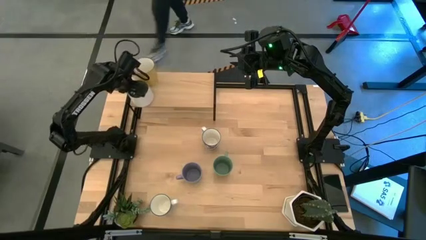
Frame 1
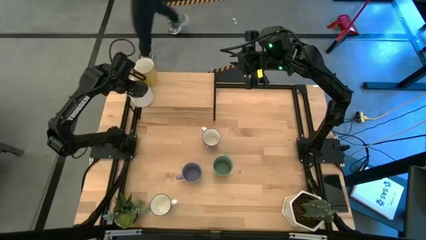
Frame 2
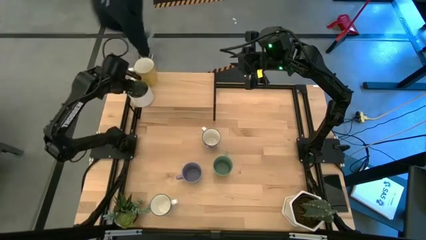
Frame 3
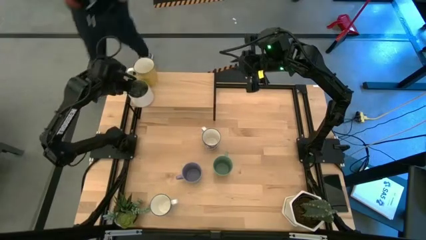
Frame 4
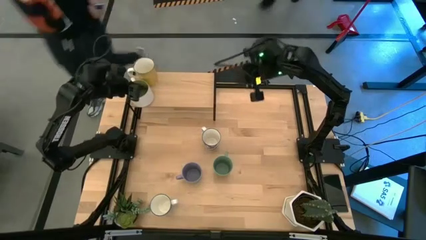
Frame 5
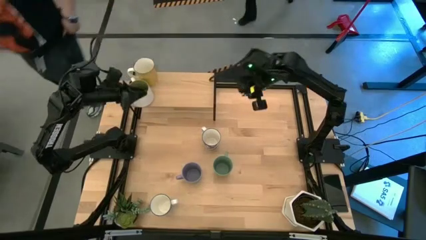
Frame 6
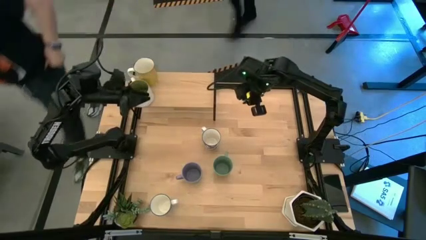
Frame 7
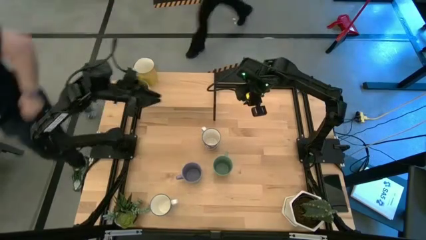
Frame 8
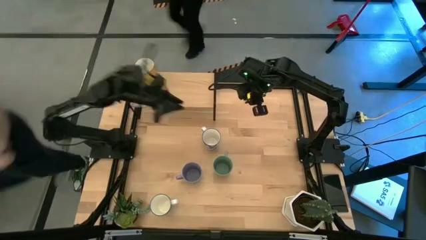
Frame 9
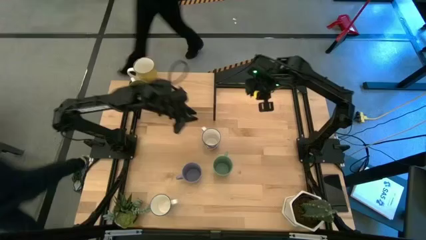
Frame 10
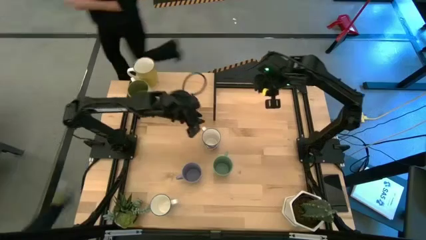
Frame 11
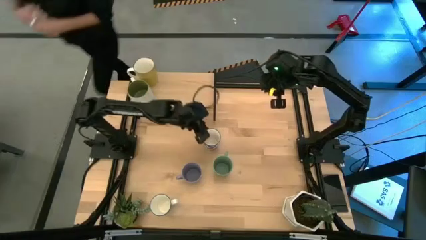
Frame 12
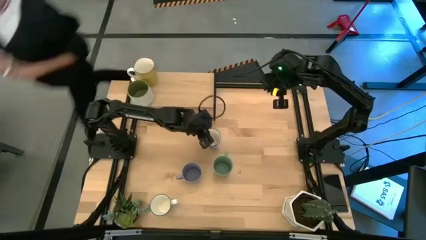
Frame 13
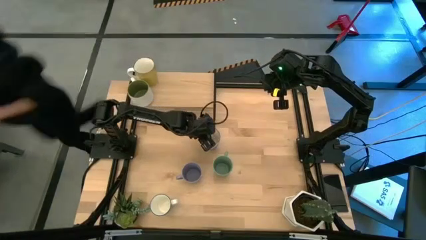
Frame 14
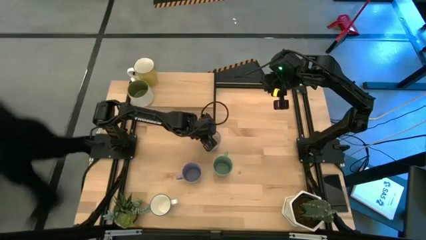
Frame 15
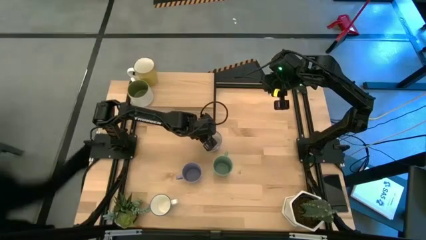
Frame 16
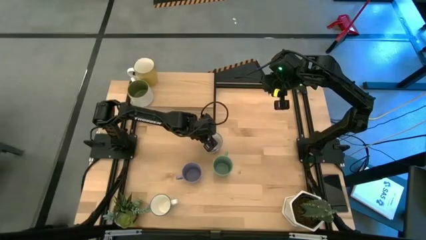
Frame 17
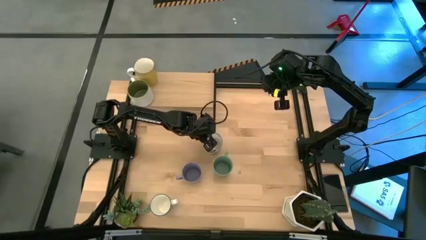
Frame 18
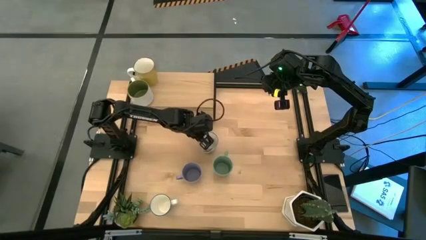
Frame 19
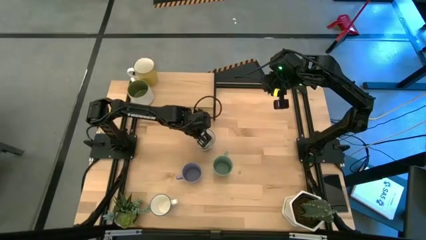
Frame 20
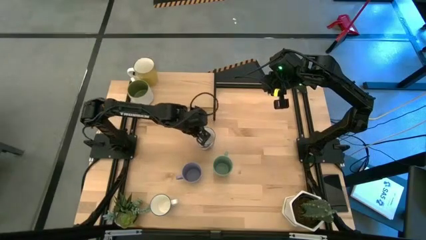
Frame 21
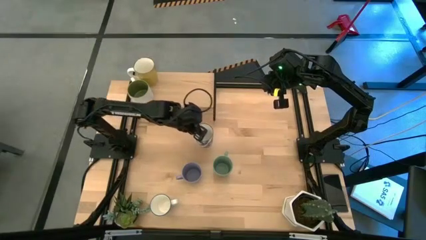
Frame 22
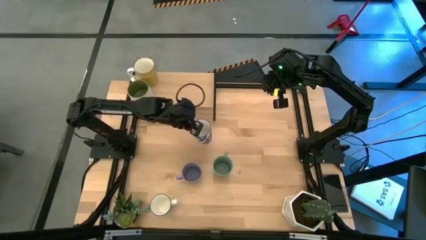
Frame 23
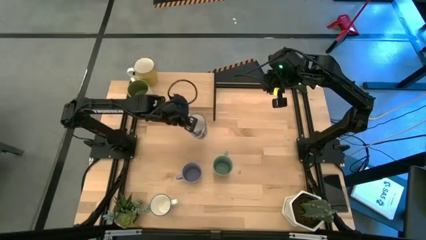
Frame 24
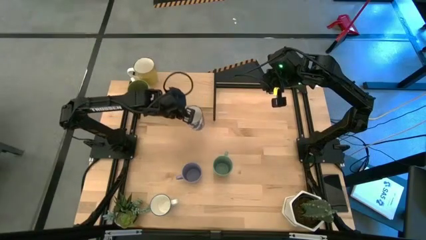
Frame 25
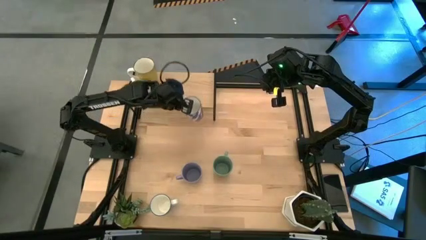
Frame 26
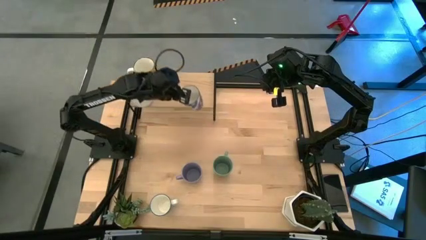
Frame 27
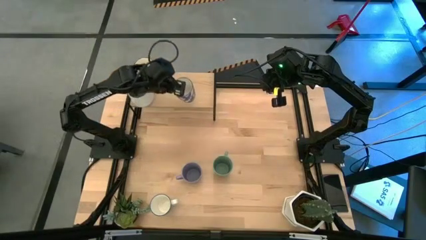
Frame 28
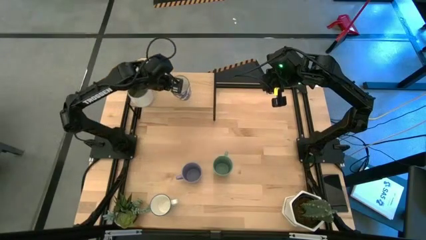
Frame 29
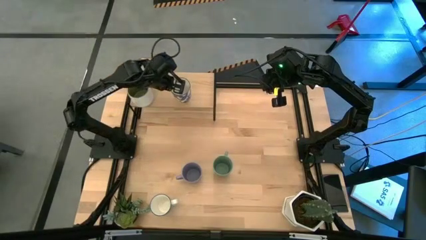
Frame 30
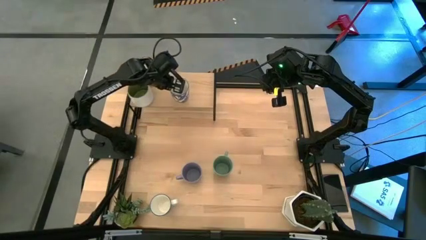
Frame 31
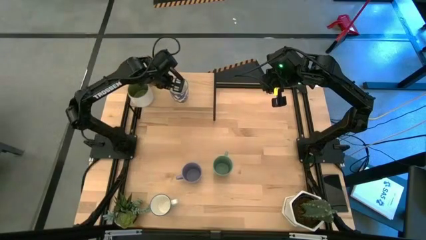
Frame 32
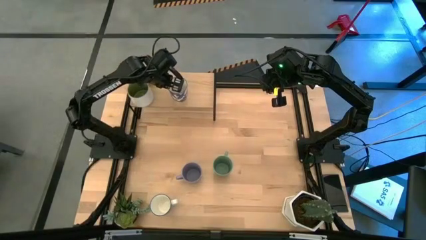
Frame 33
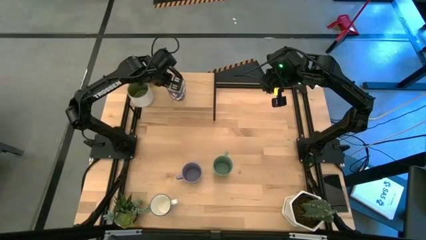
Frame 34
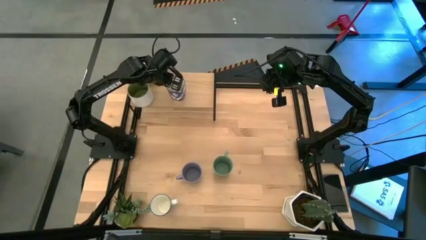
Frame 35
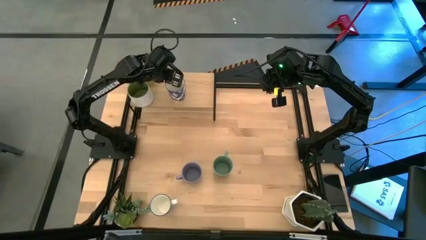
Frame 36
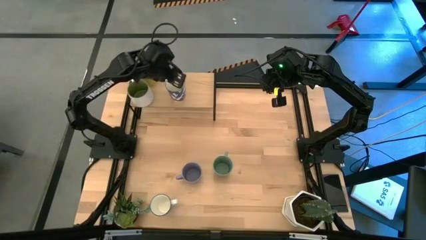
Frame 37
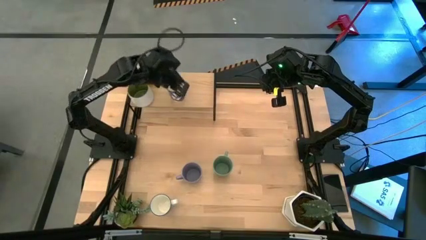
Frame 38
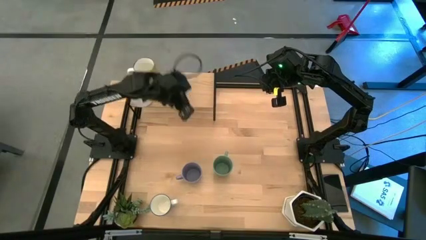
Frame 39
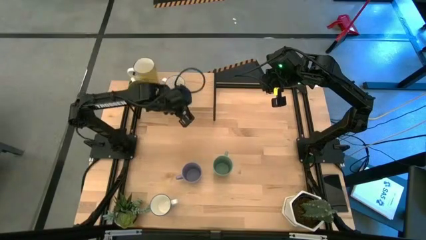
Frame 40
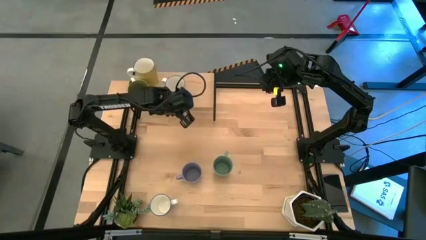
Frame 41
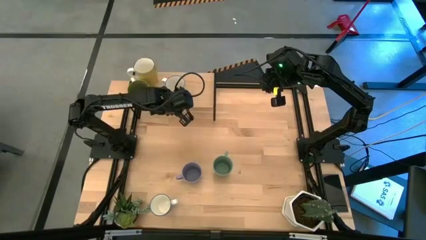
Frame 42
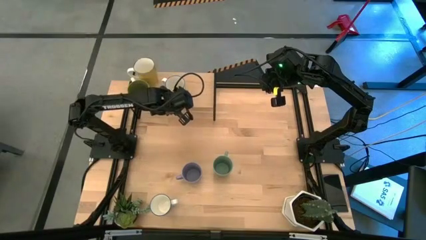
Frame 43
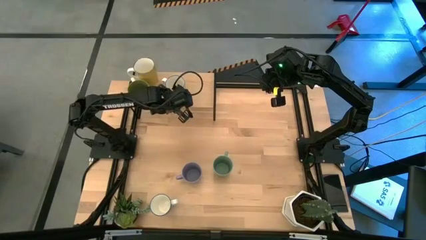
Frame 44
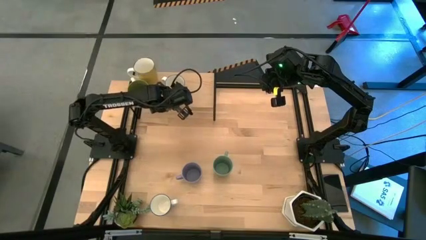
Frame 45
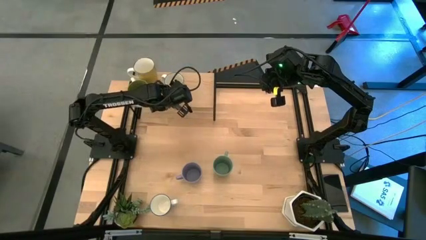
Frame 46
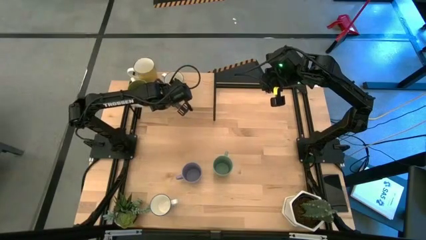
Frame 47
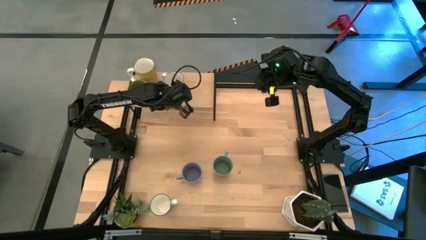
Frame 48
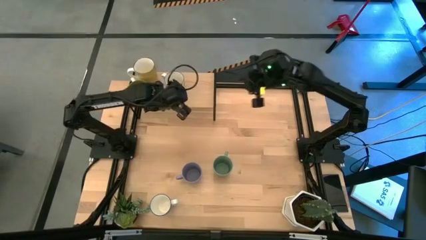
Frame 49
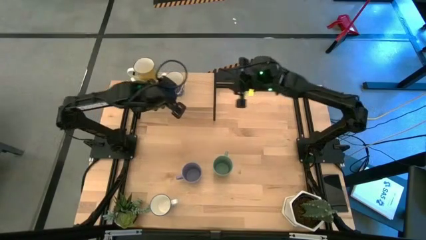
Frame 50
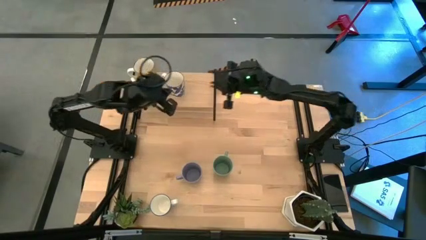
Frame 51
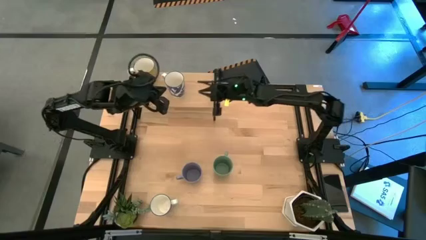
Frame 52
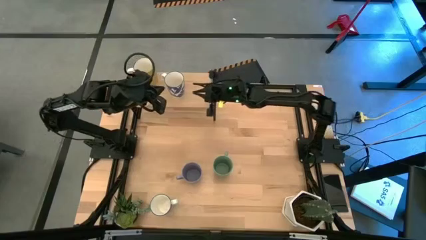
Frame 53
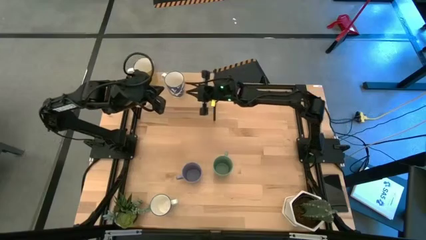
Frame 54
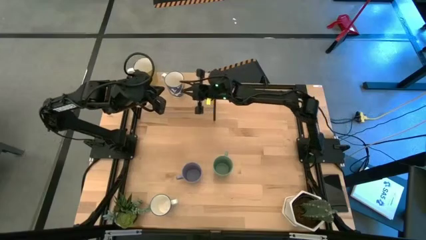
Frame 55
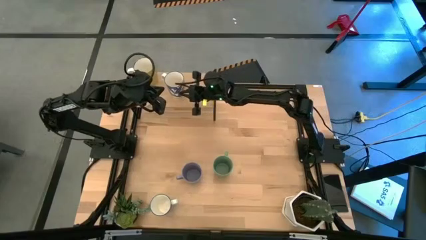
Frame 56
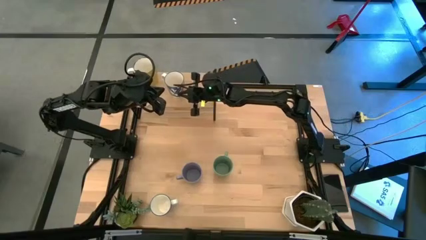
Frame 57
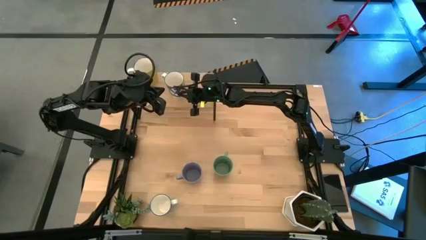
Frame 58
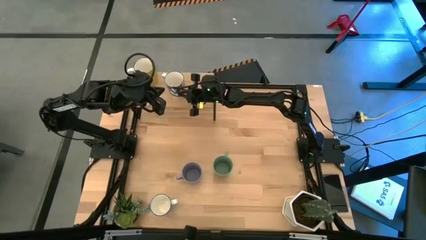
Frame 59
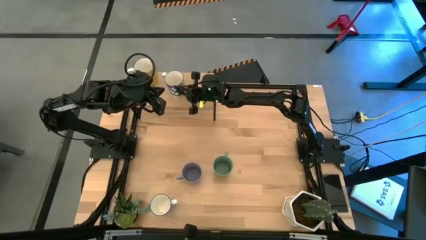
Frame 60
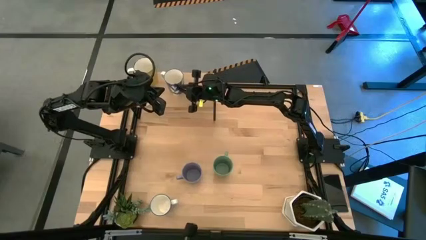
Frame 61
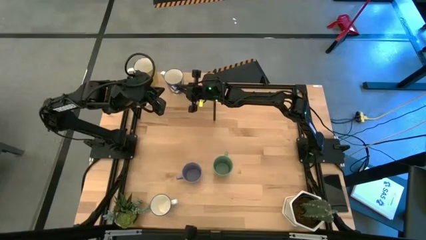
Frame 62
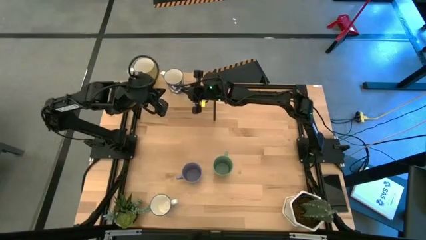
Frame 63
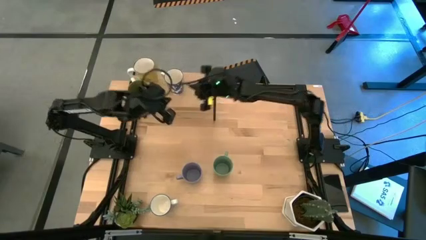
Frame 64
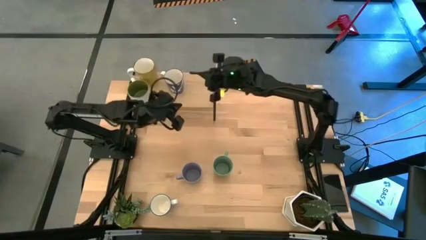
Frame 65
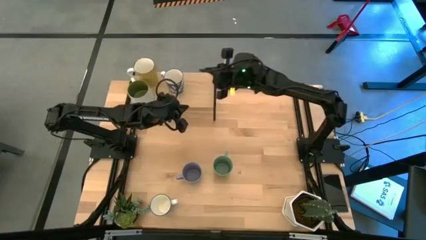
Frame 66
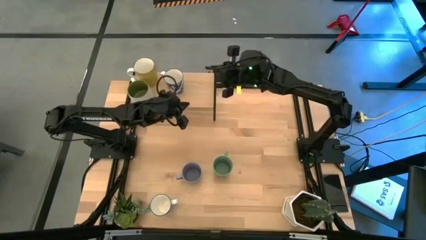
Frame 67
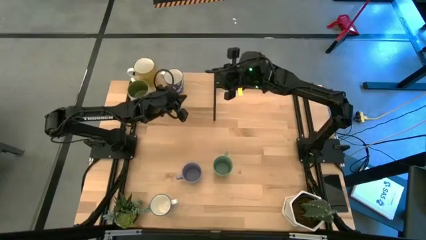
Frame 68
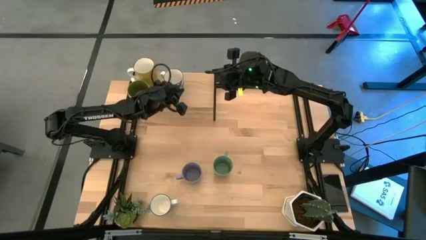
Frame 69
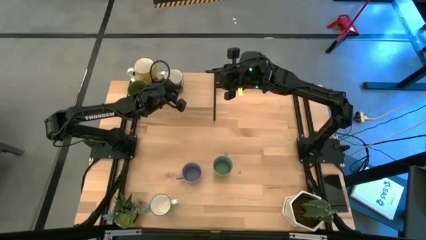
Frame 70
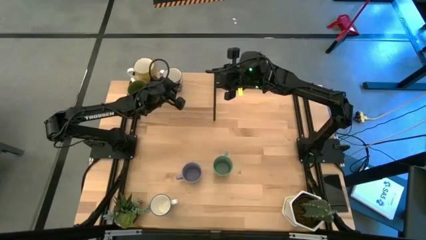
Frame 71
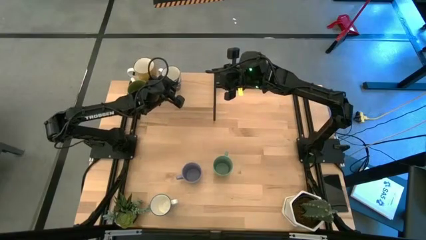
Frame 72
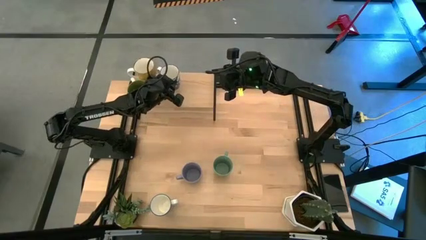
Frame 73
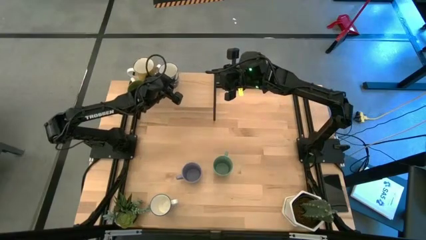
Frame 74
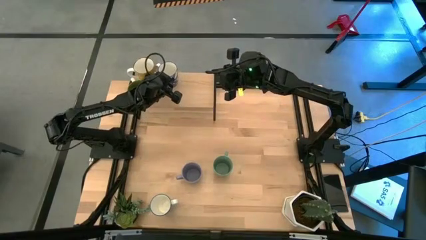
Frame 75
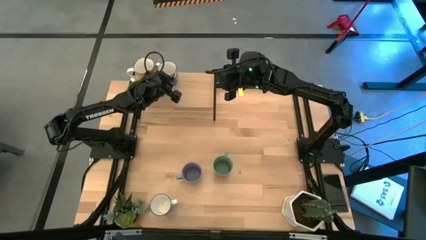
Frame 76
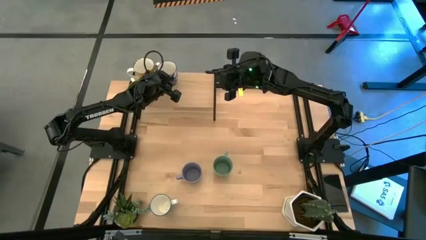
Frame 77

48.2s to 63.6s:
Task: Place coffee mugs
Put the top blue cup on the shelf
